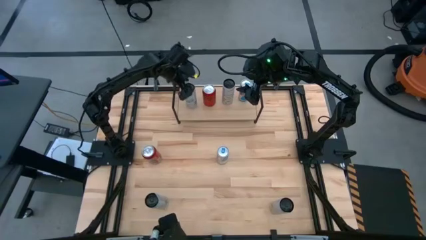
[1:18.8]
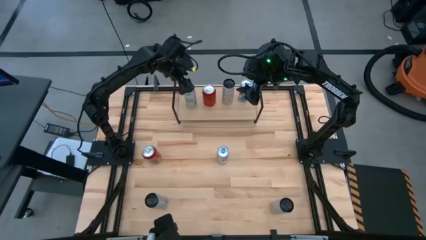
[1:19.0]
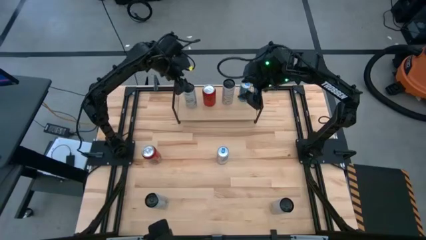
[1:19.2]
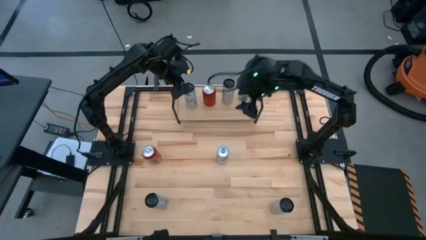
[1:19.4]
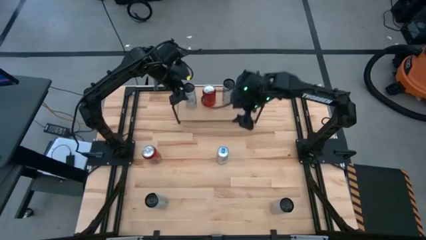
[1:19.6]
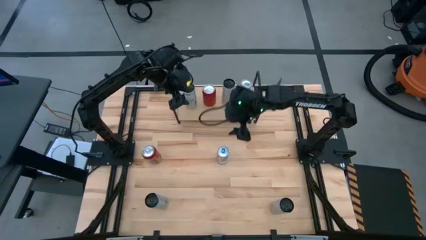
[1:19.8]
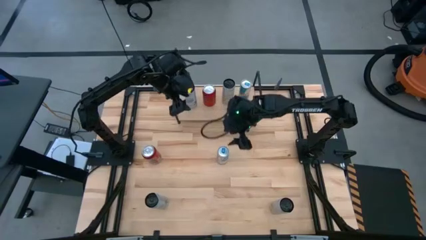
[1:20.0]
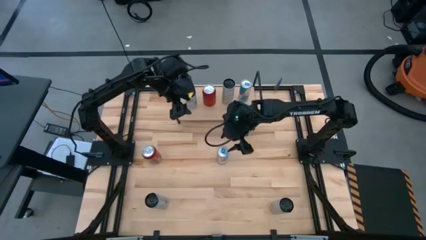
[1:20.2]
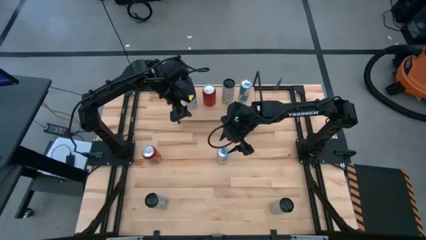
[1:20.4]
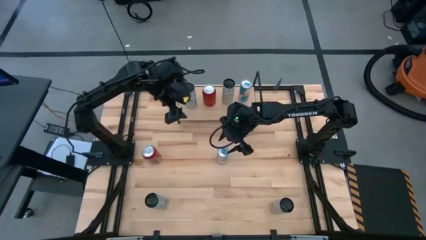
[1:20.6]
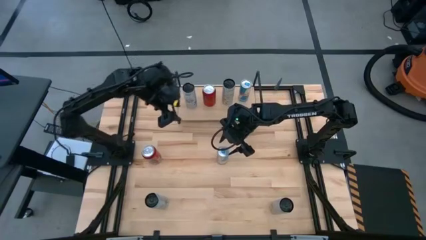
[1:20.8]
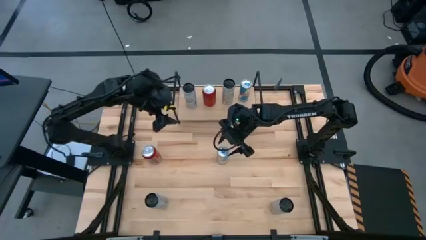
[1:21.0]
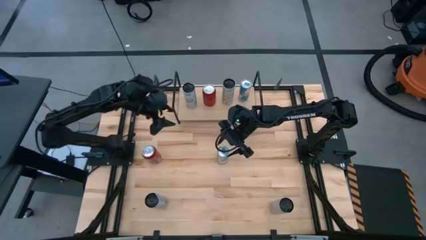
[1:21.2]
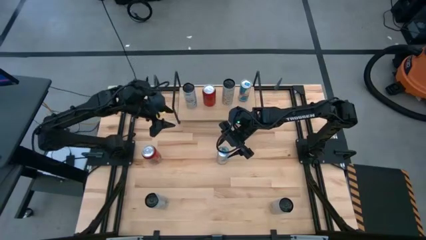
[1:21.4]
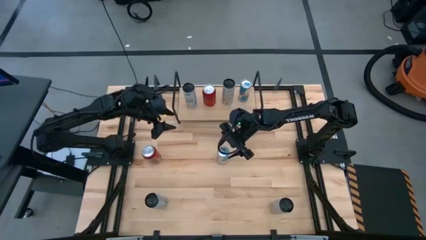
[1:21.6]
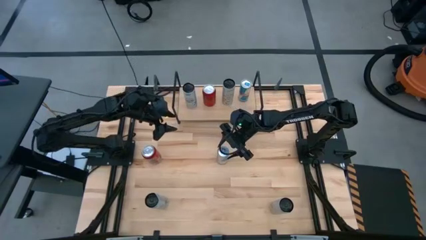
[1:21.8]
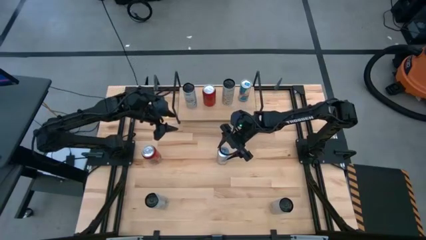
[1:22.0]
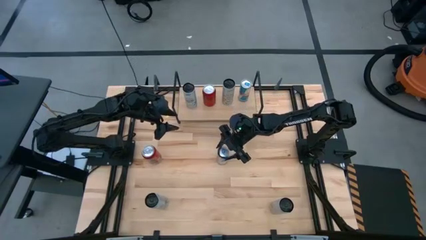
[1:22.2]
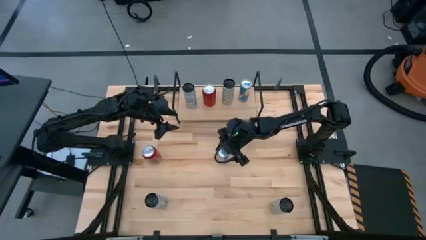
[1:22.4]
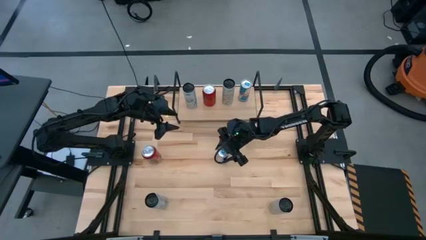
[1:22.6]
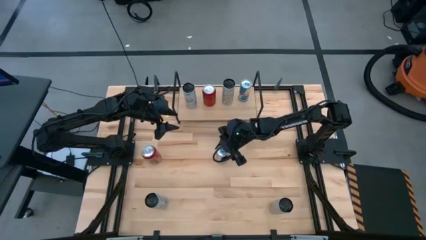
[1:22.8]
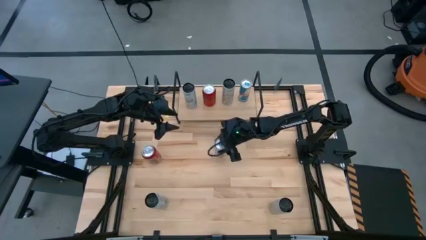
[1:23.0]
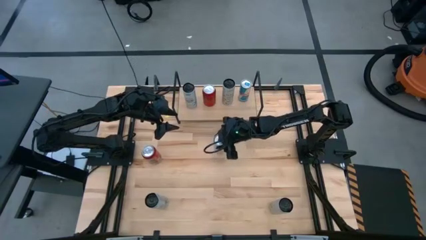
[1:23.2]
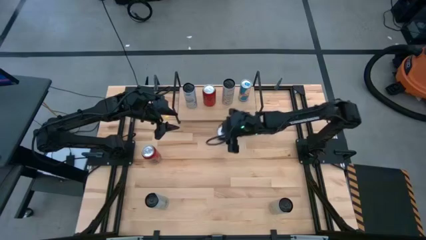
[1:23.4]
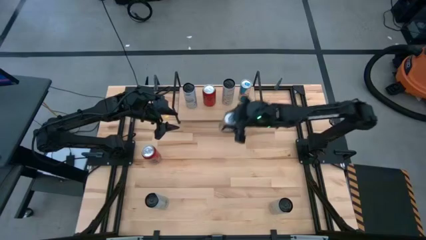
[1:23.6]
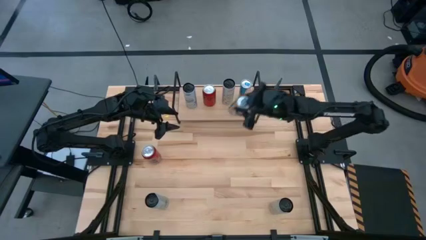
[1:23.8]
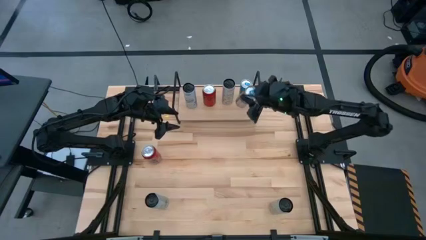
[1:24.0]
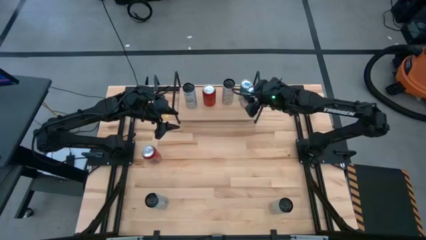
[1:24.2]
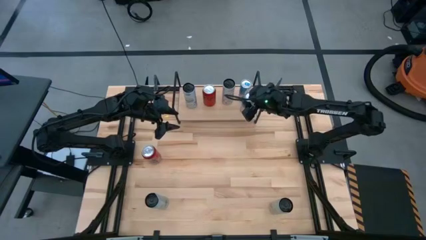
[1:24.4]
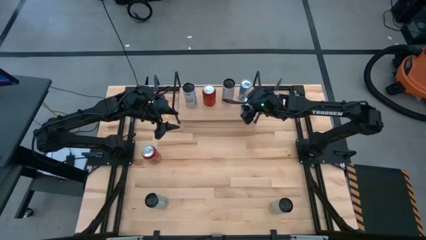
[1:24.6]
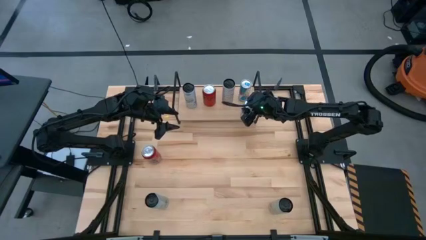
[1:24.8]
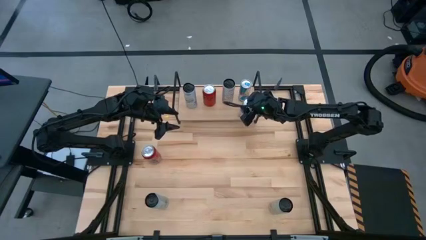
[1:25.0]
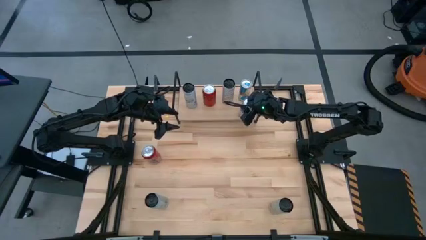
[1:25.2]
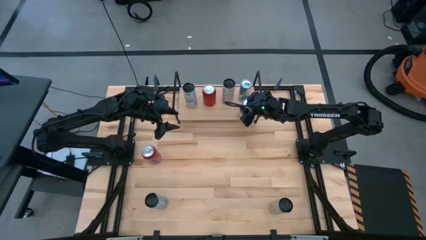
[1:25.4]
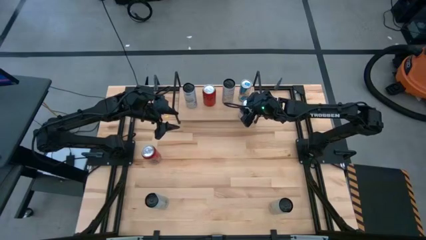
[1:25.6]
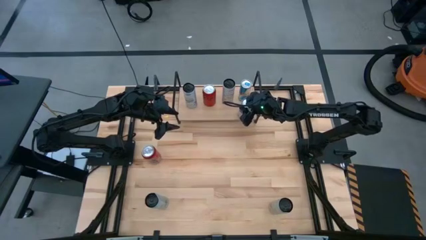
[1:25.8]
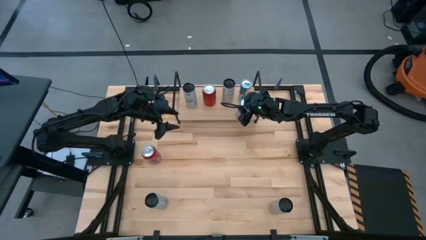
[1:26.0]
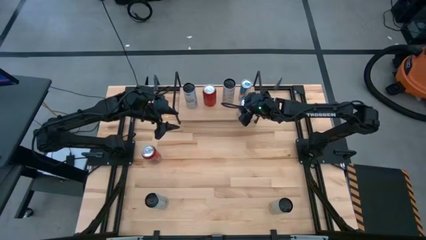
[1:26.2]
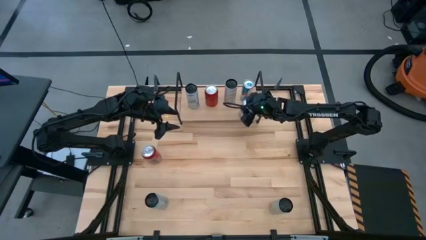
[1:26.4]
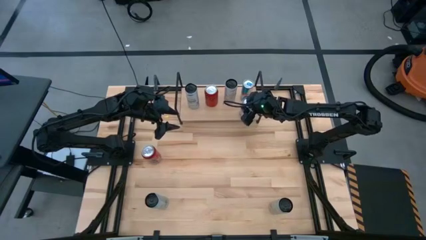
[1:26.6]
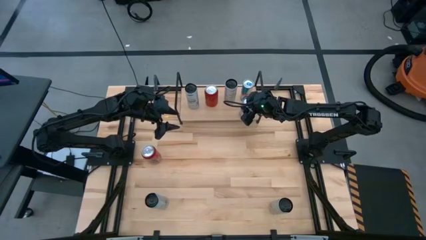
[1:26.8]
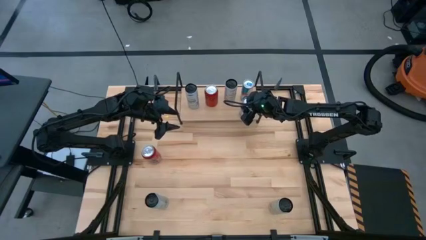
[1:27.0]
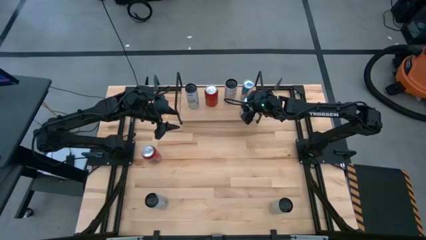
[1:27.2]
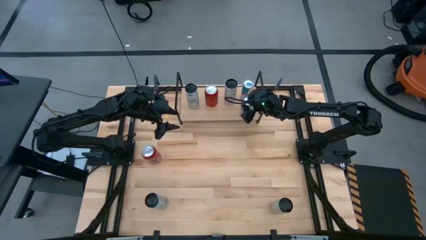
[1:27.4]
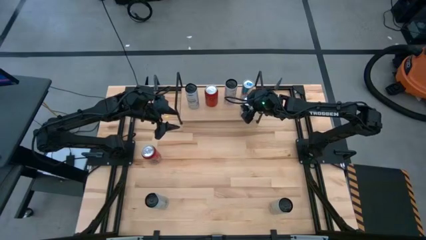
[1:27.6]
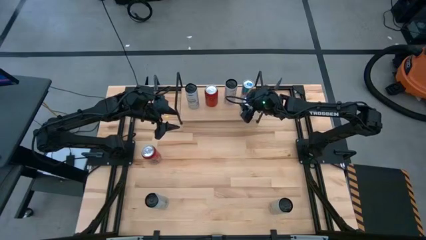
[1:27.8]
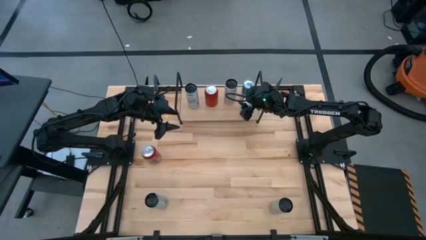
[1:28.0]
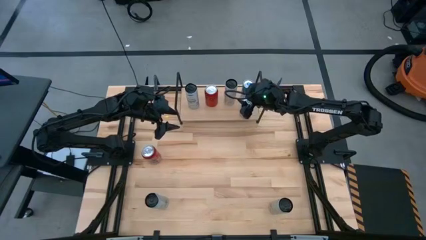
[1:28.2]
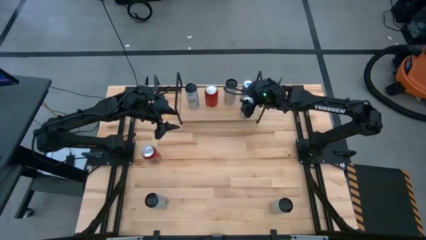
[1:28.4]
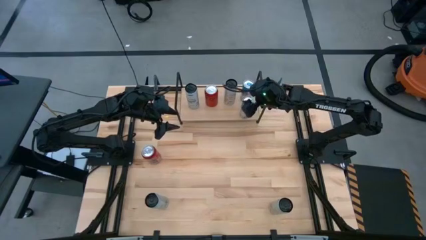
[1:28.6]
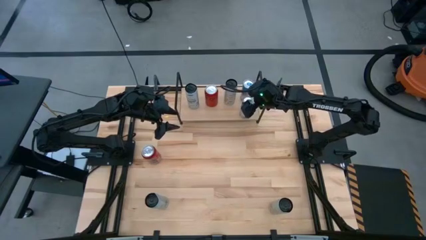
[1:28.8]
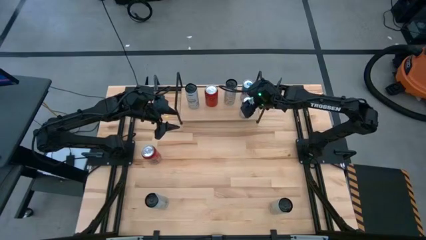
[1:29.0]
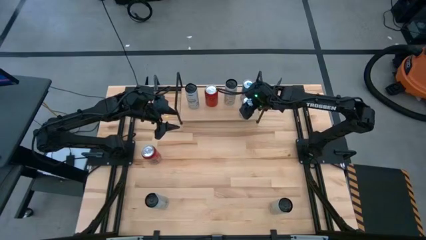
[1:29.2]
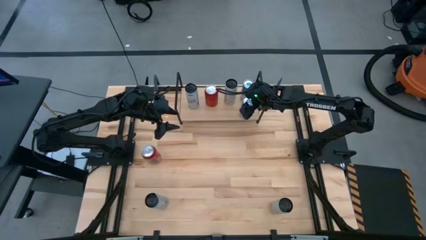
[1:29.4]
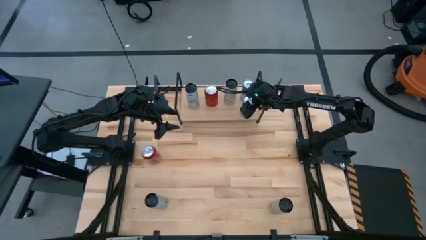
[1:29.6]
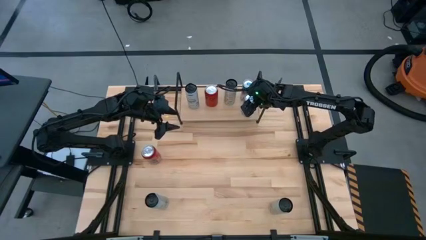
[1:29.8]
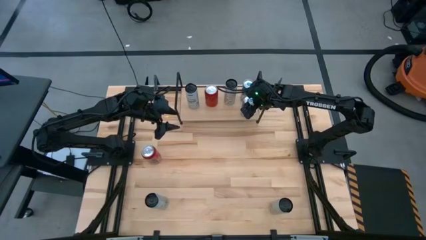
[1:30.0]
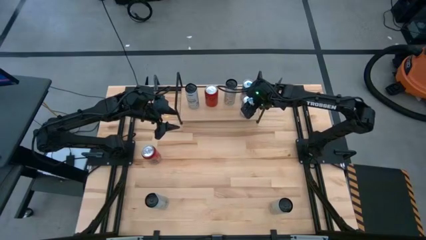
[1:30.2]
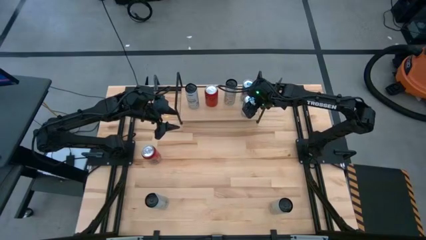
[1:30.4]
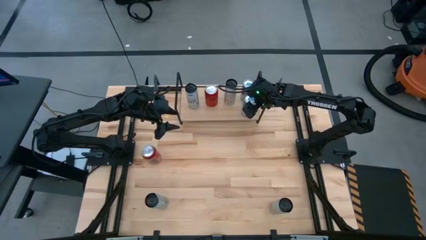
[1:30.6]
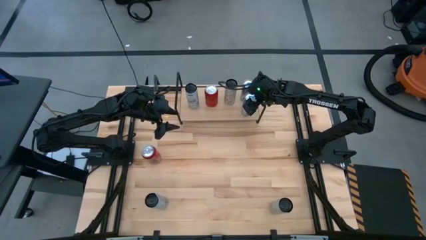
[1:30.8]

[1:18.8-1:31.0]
Task: Place canned beverage on shelf
Put the blue soda can aligned with the other blue soda can on the shelf
